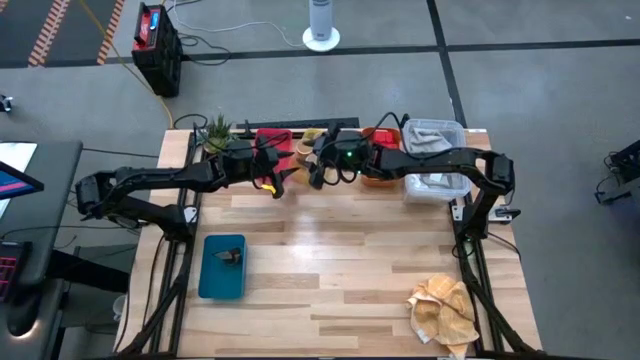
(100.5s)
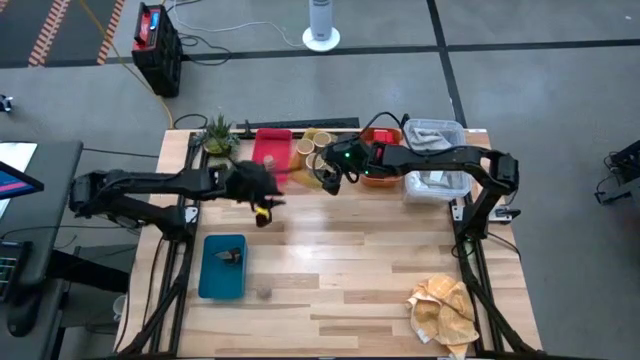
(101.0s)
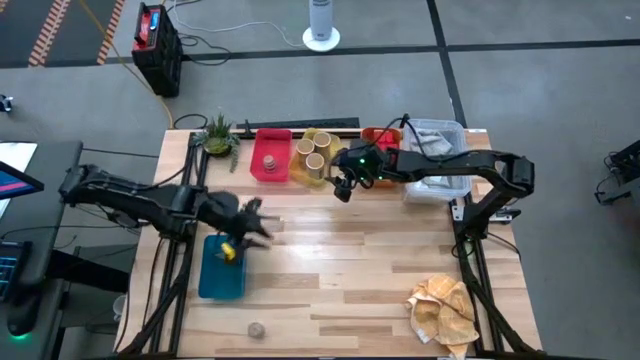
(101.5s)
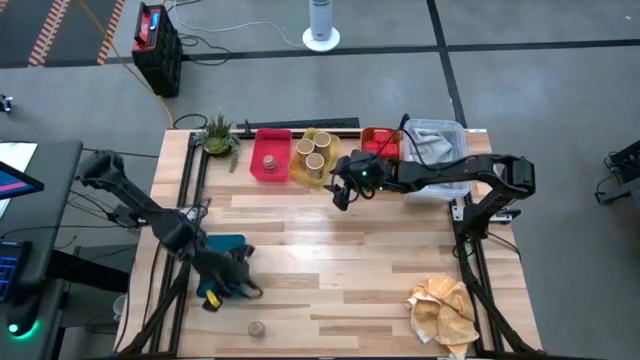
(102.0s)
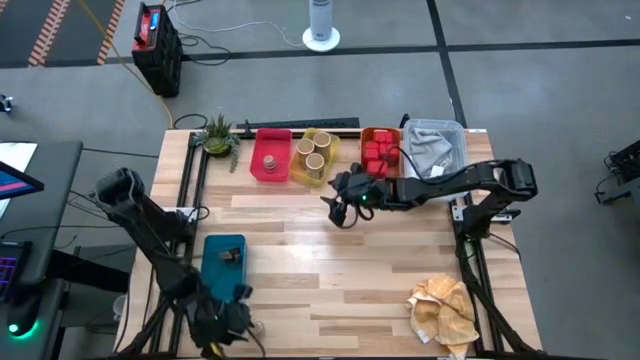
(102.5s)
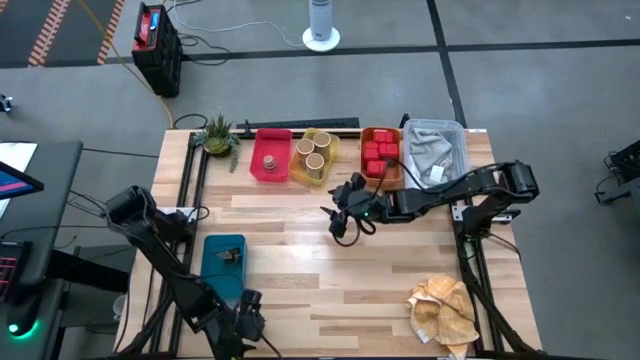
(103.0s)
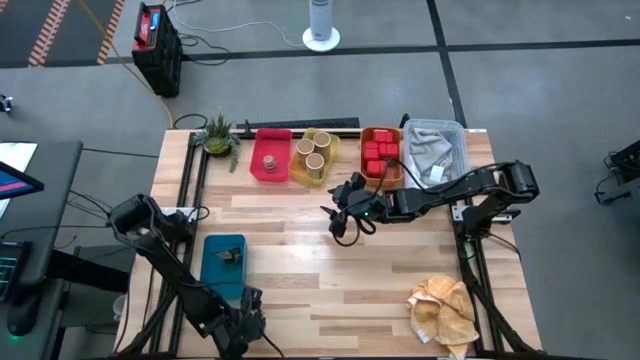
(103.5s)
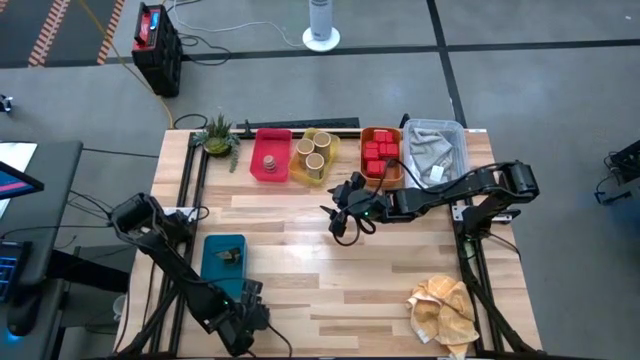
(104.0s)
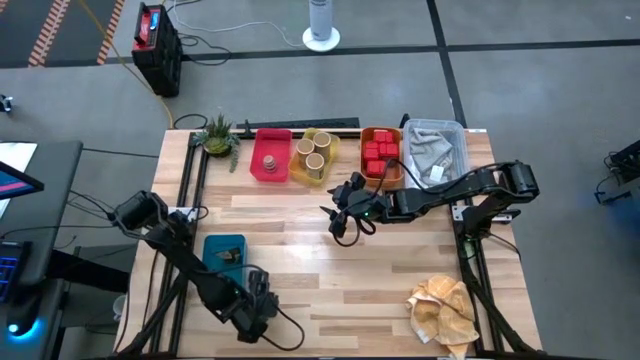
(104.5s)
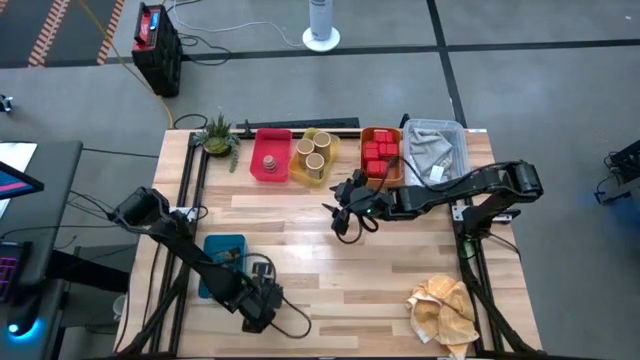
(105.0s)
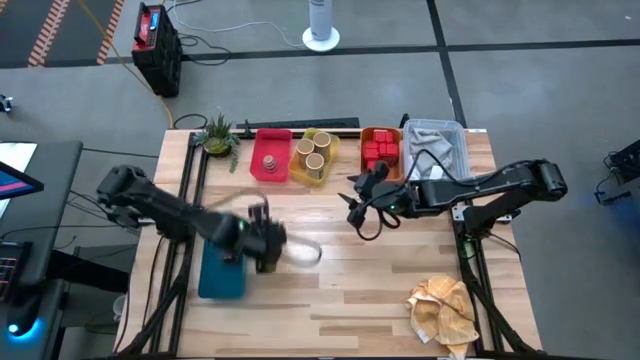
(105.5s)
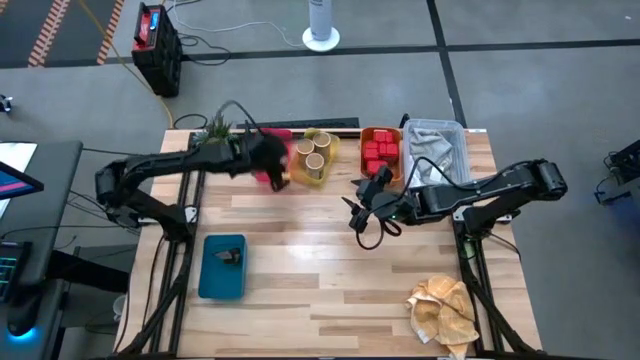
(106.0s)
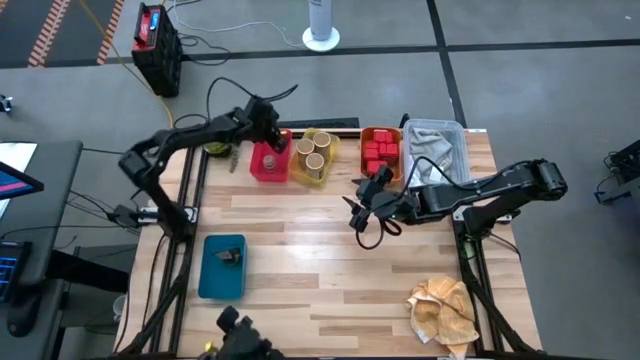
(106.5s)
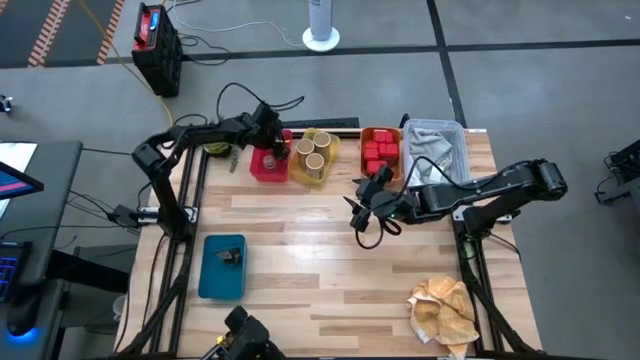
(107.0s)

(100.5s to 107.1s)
Task: Sort spices by type
Put the brown seasoning bottle into the red bin

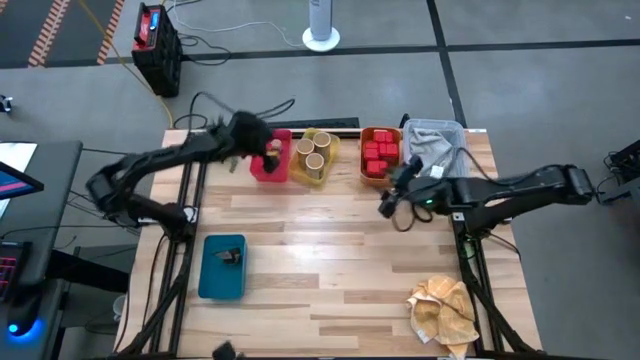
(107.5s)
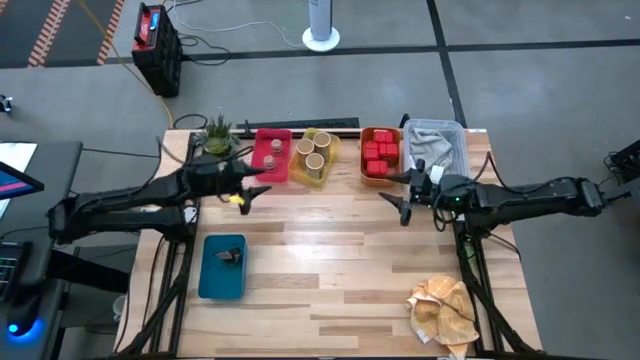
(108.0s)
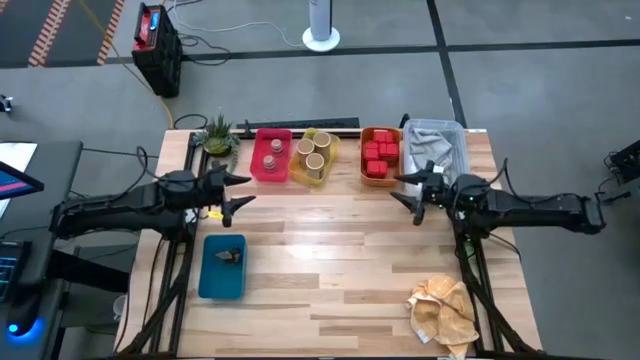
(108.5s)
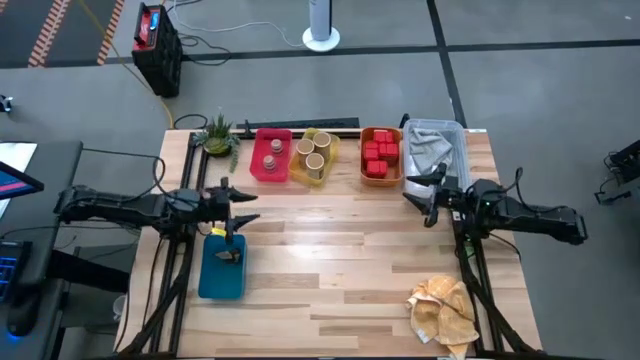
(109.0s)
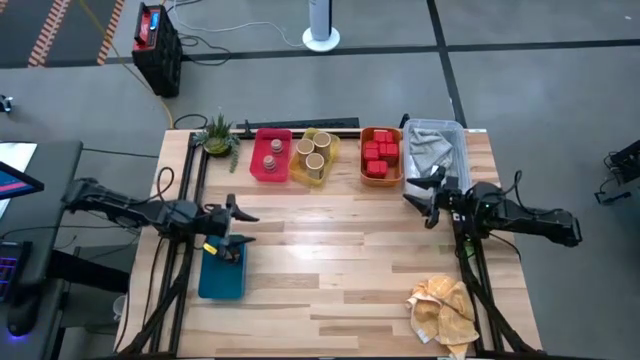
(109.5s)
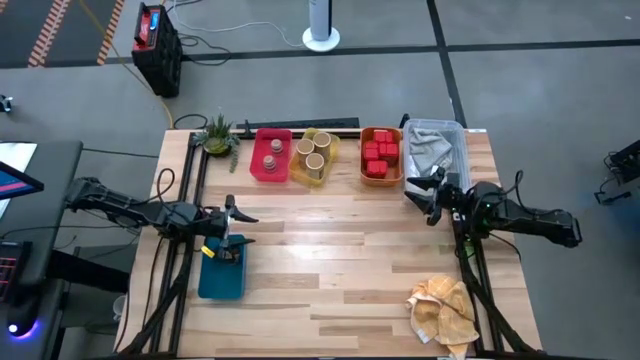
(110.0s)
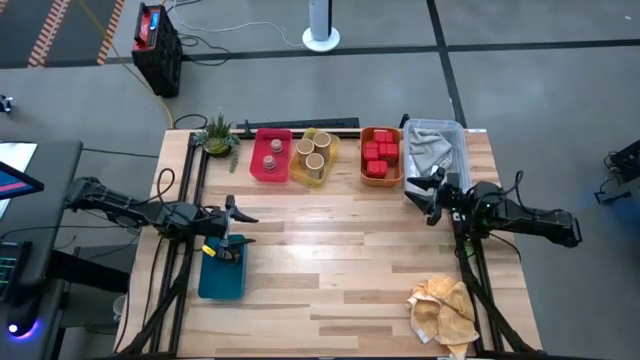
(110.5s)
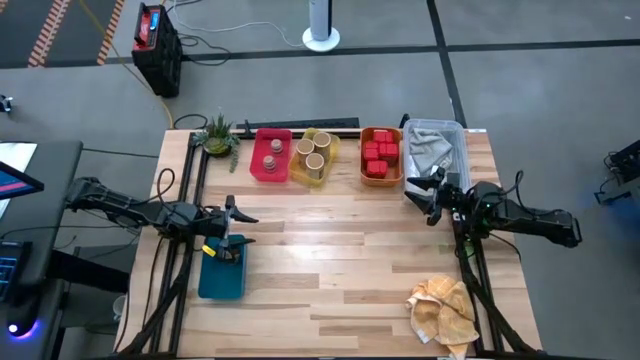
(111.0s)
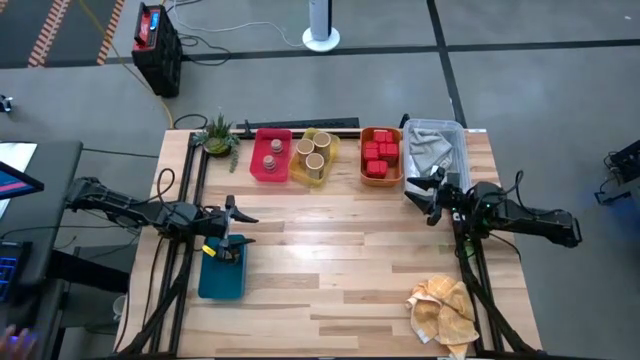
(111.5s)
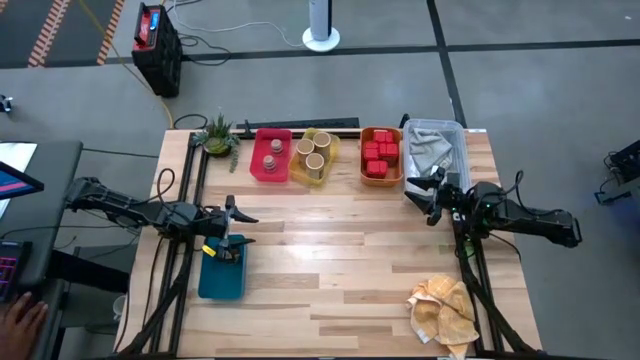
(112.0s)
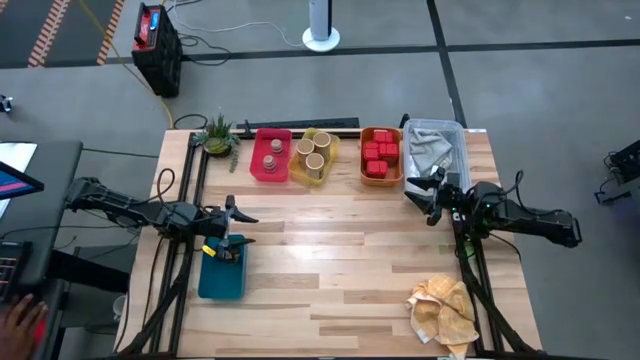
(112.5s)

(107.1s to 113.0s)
Return to Home Position

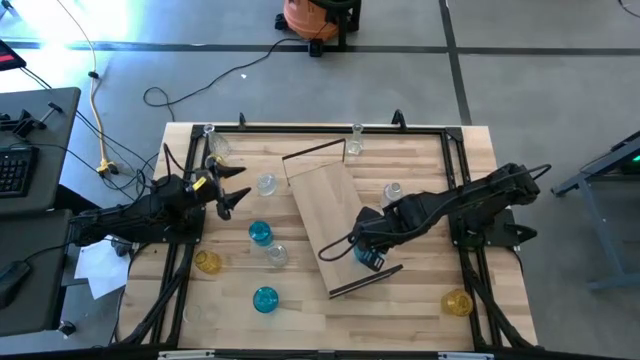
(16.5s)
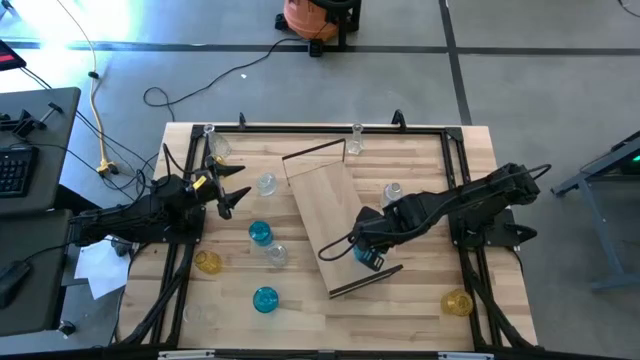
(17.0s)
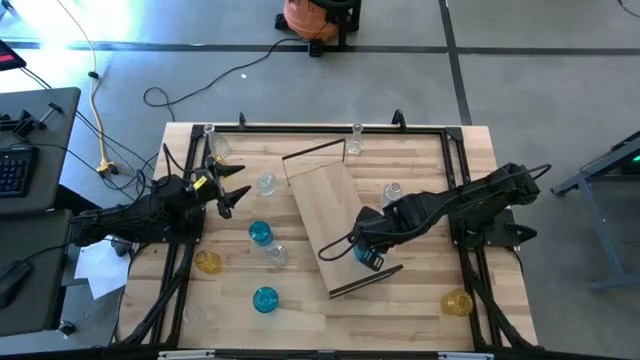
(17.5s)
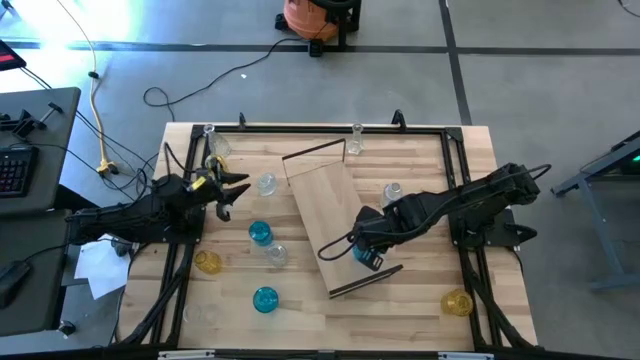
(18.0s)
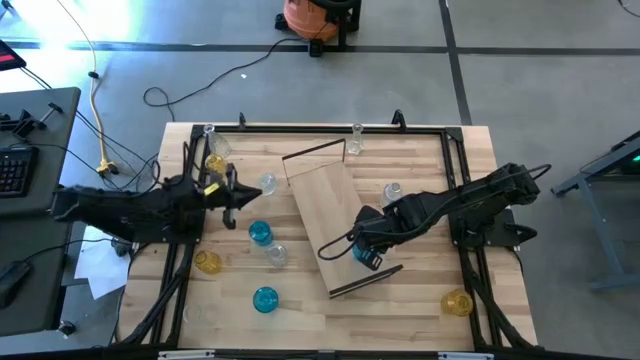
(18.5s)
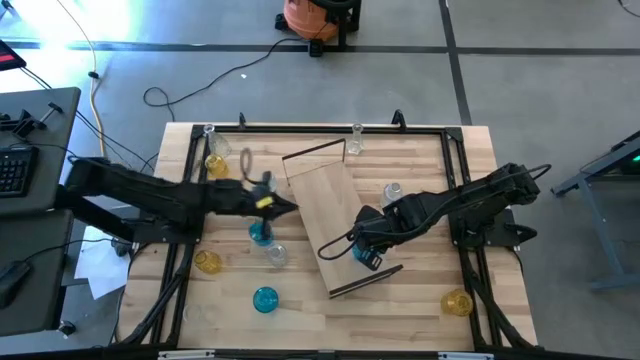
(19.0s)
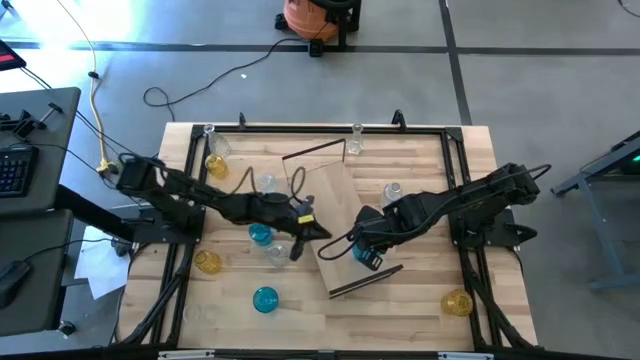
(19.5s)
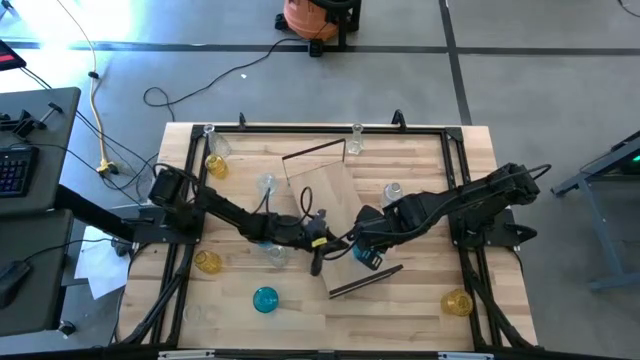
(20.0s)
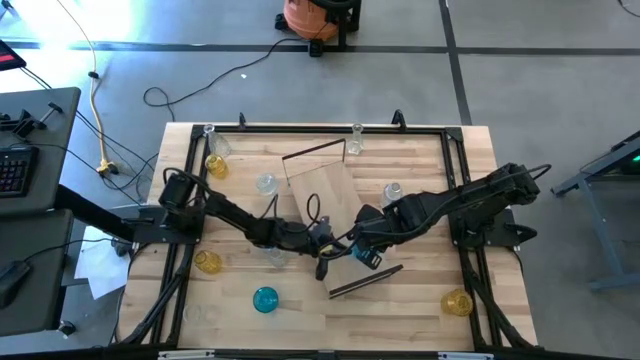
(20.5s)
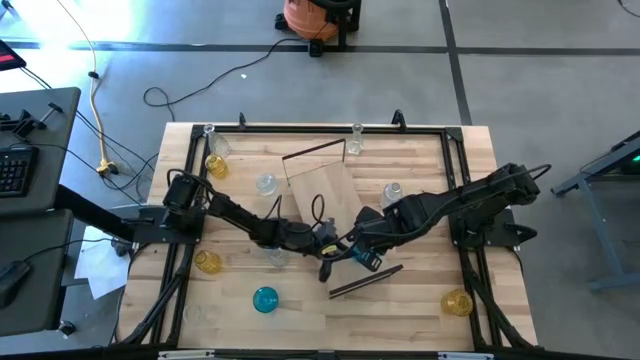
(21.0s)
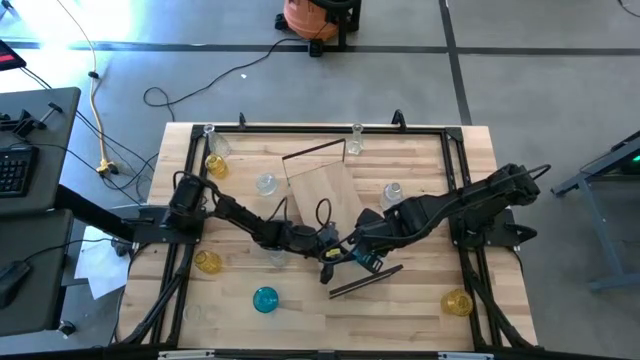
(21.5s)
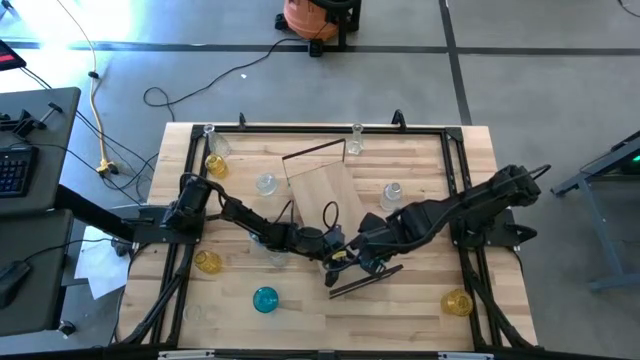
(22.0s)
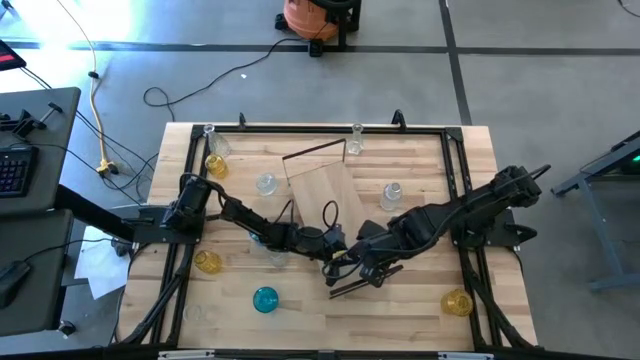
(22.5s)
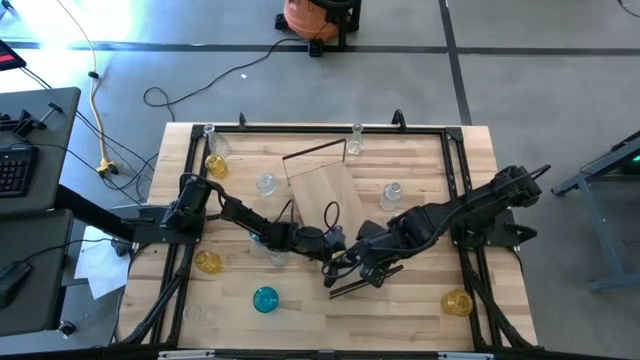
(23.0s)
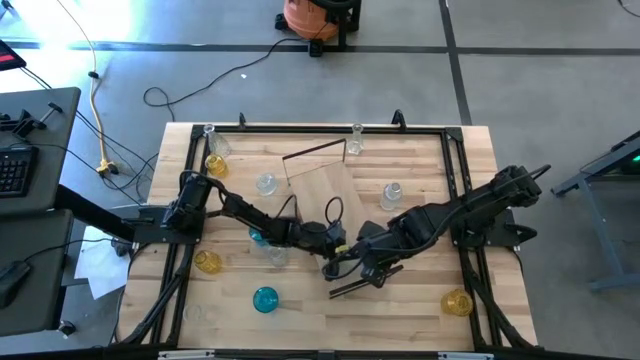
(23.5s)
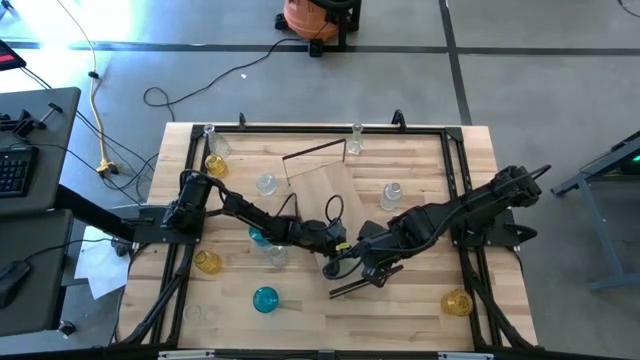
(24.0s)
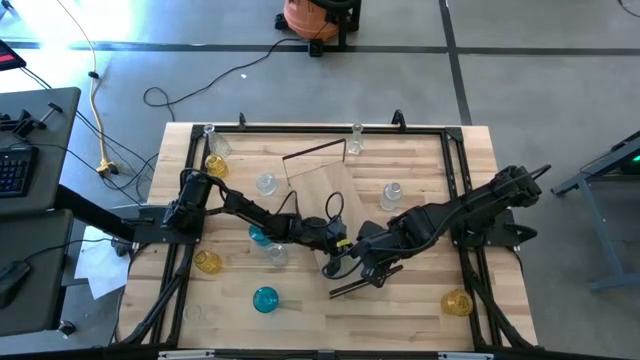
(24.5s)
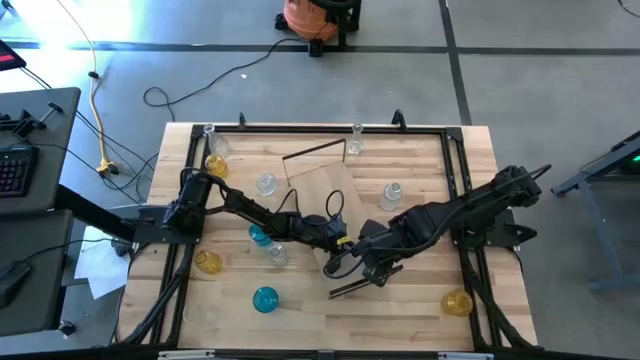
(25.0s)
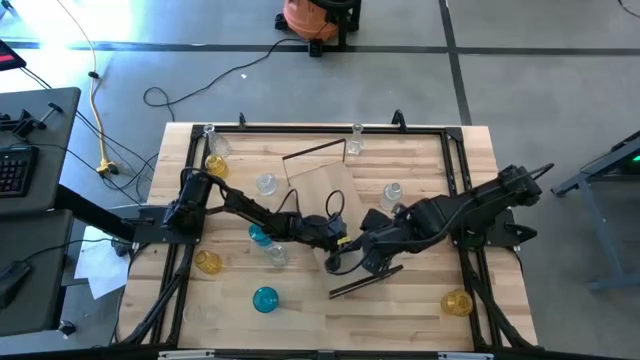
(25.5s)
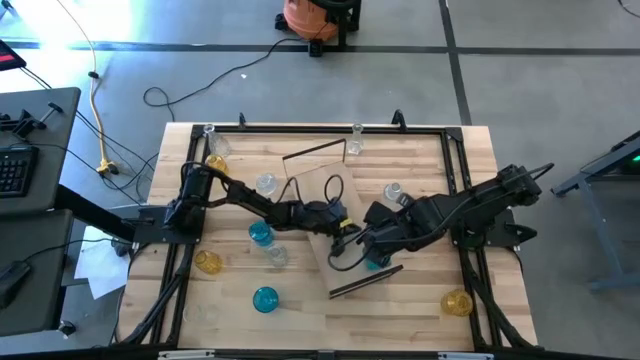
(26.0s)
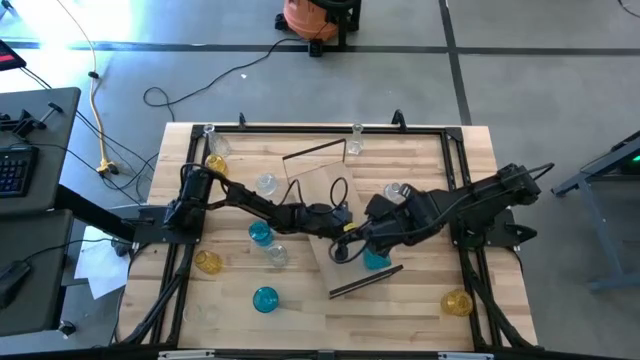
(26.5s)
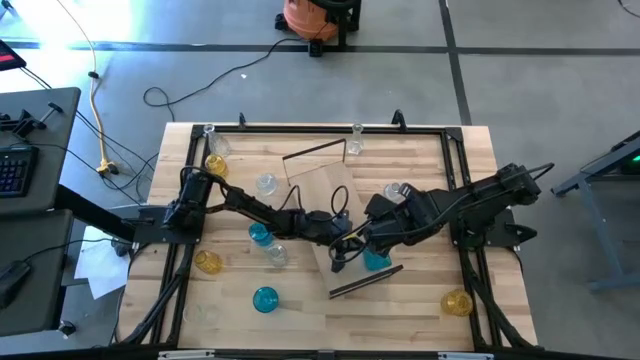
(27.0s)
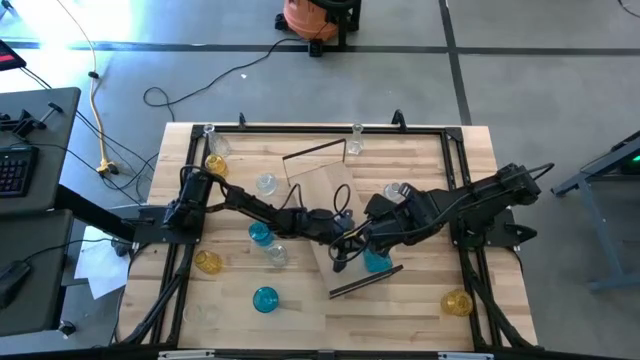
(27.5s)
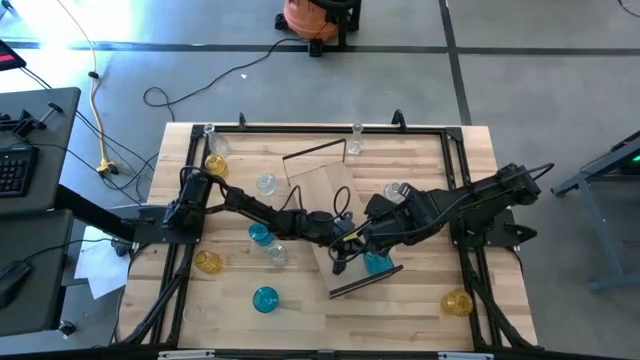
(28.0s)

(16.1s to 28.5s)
Task: sort vases onto shelf
Put the blue crystal vase on the shelf
